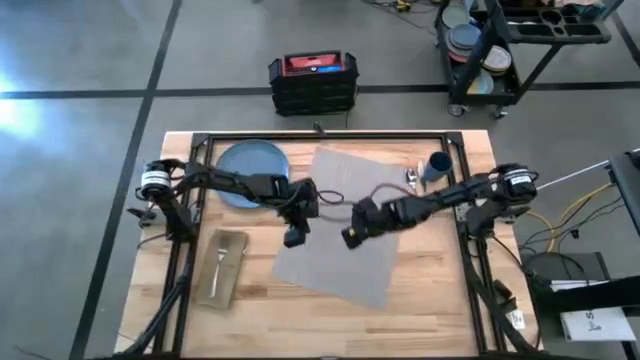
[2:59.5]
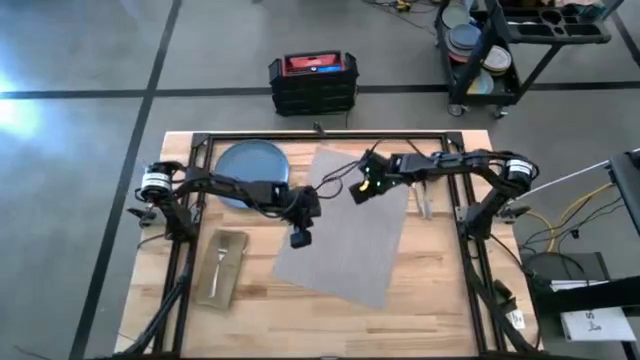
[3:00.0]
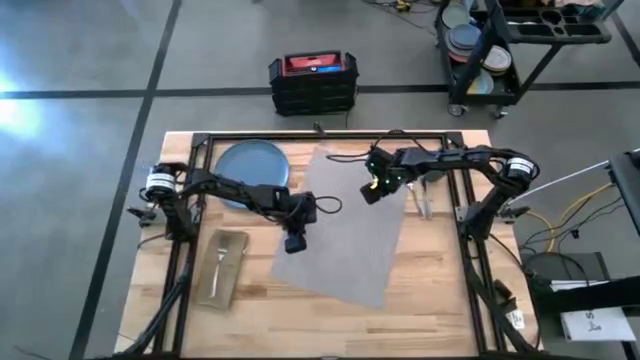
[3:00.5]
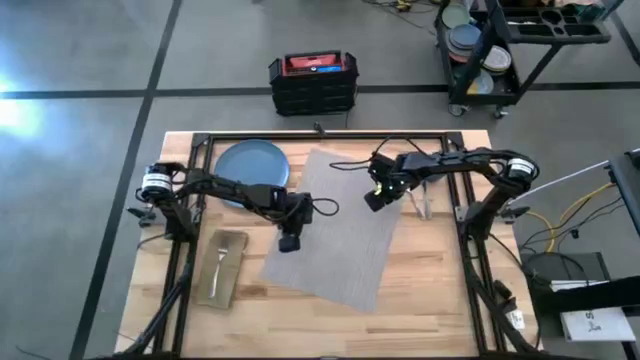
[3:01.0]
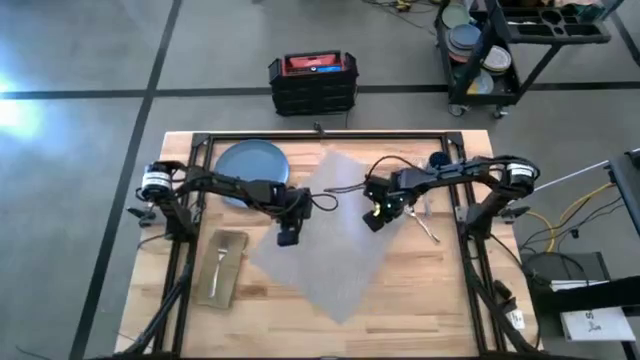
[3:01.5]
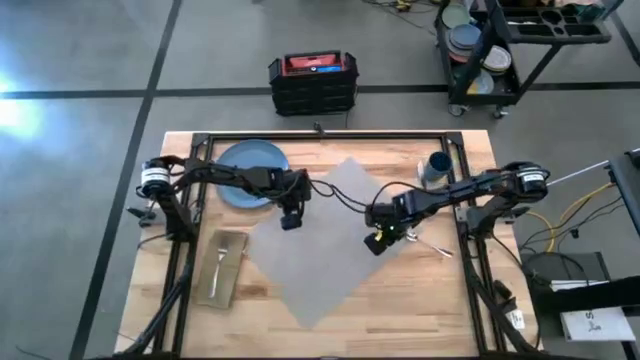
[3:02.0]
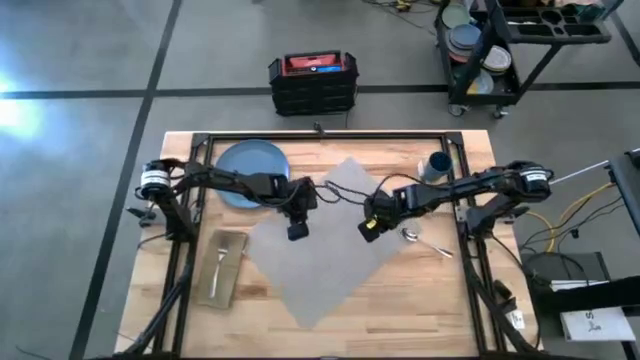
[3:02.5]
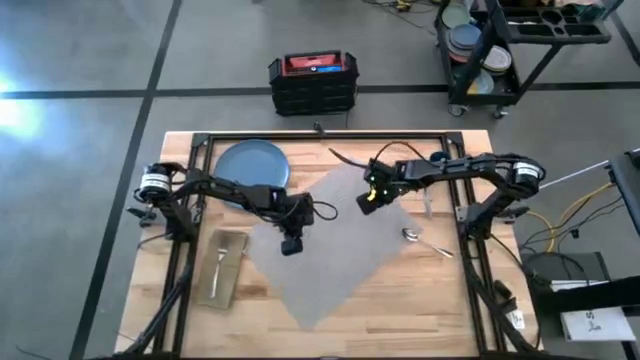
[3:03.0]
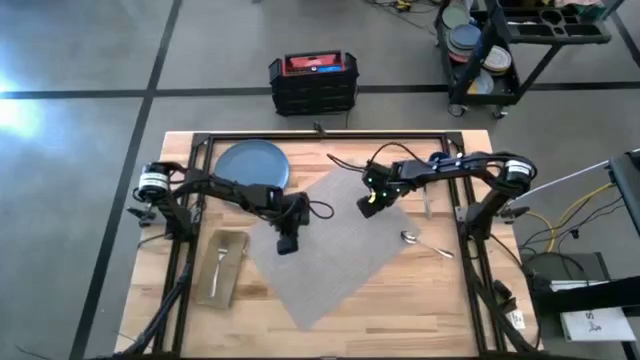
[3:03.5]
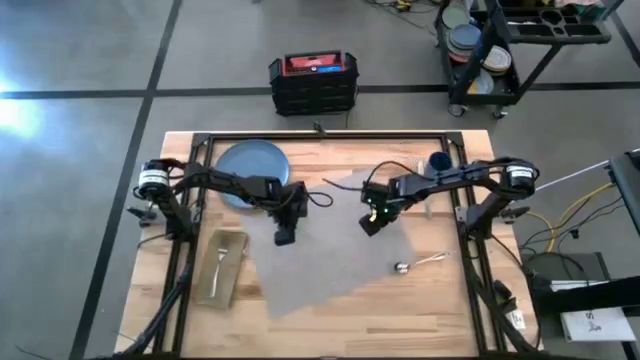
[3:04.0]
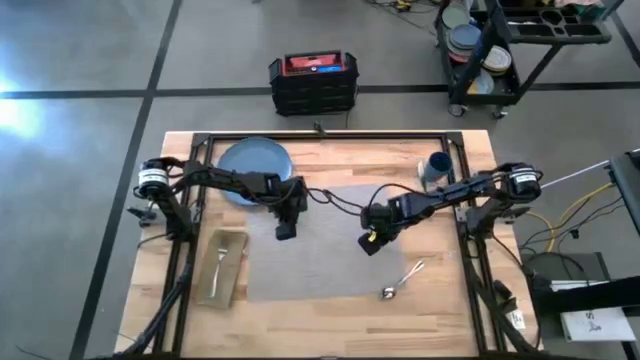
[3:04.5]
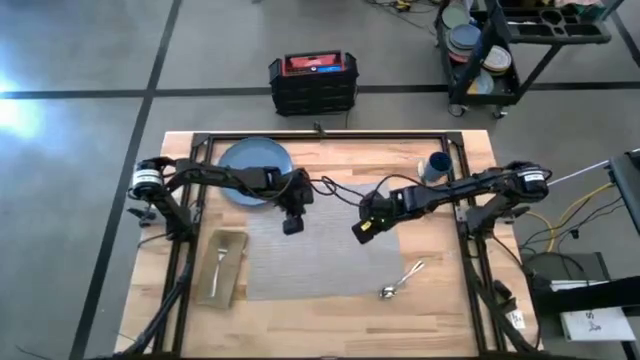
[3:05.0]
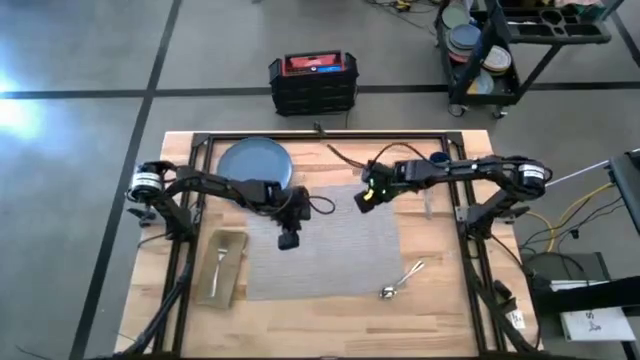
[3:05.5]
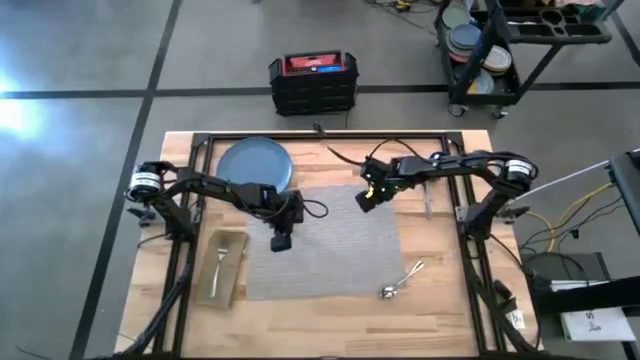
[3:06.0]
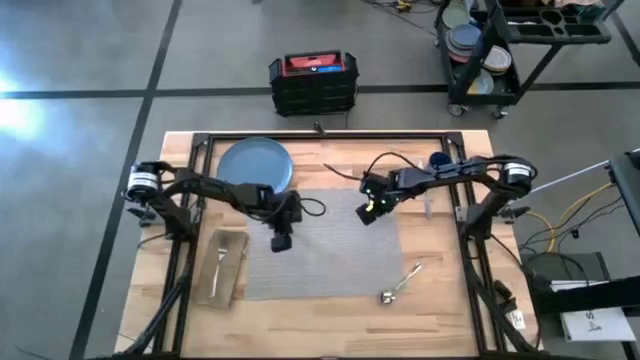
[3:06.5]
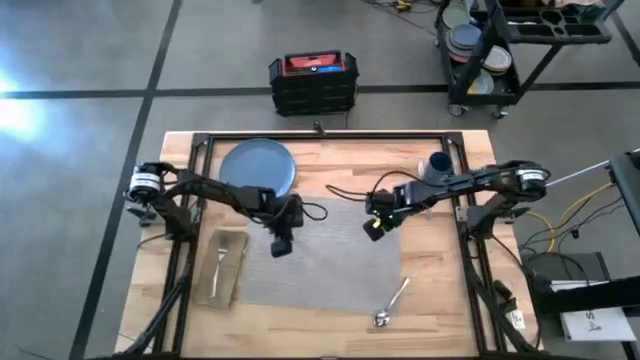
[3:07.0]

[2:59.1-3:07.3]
Task: Set table place
Adjust the gray table mat

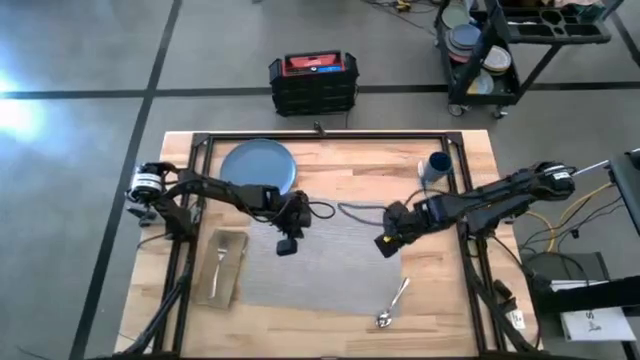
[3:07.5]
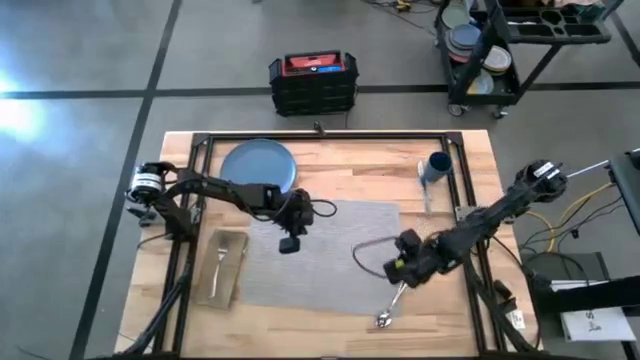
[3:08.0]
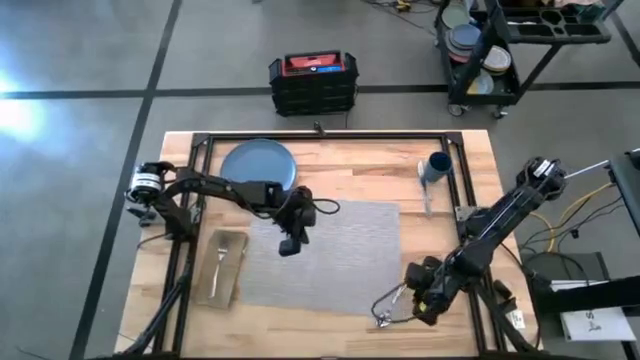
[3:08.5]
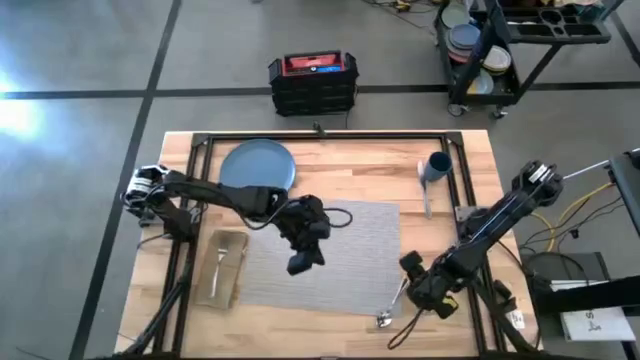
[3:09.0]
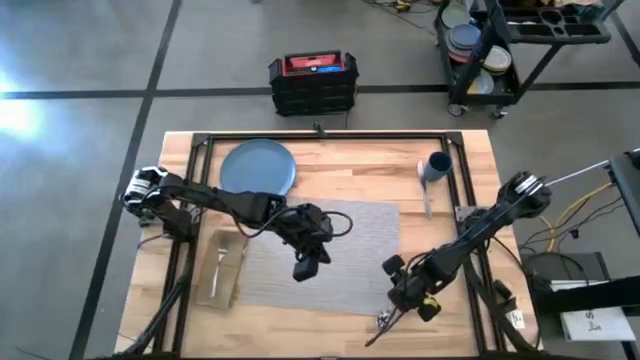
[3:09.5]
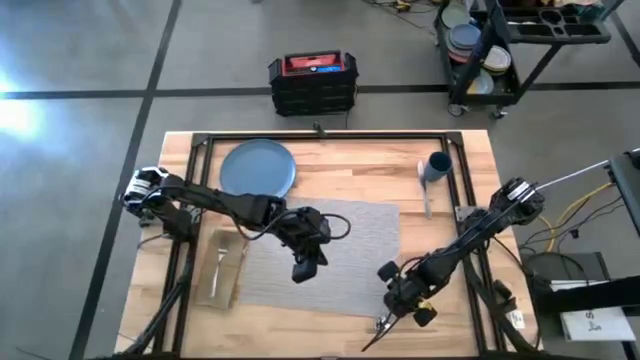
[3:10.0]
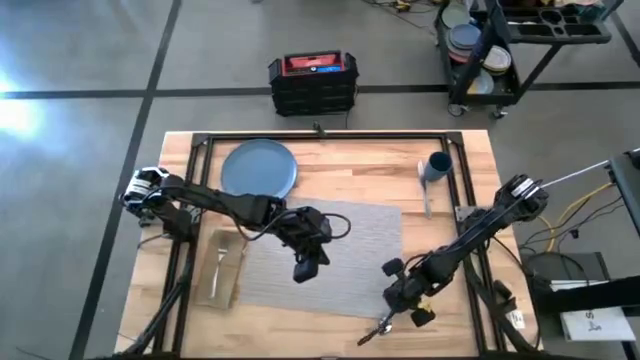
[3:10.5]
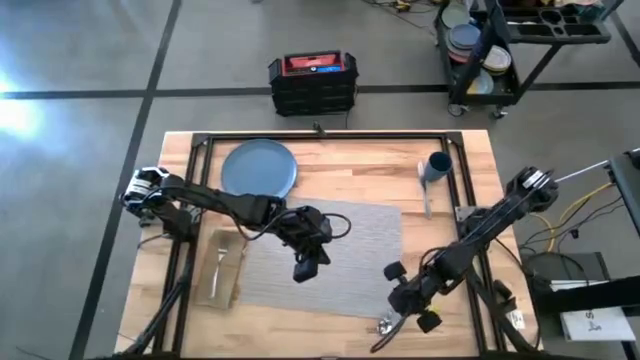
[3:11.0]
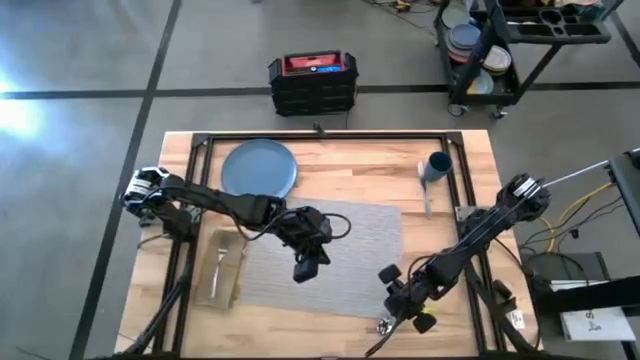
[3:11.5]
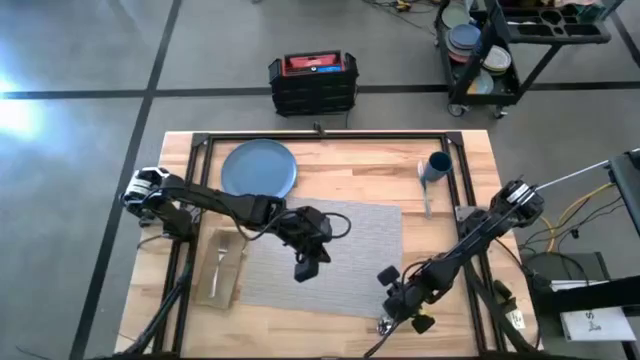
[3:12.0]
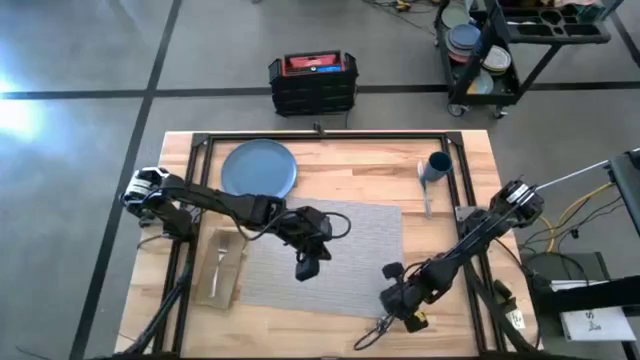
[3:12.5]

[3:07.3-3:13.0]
Put the silver spoon to the right of the gray table mat

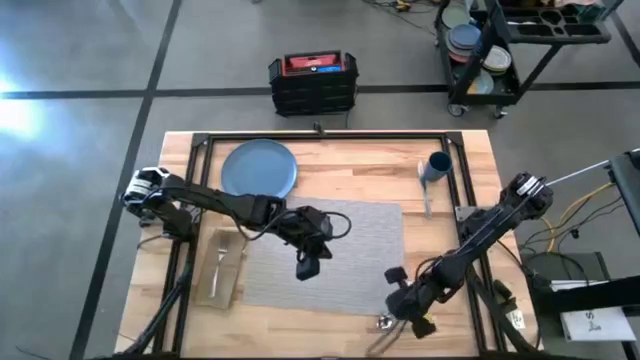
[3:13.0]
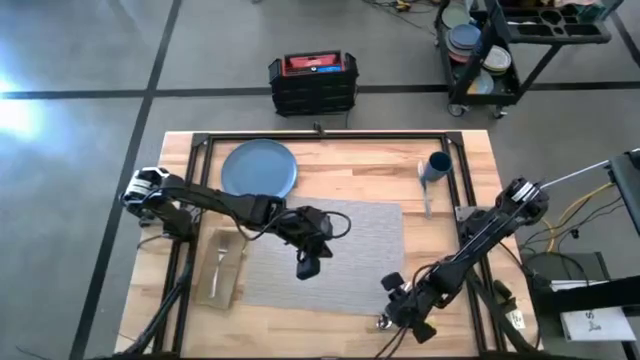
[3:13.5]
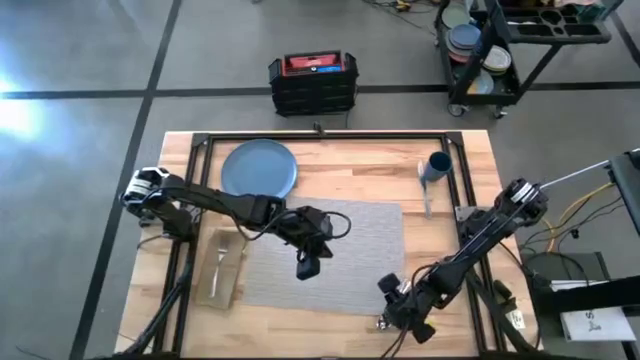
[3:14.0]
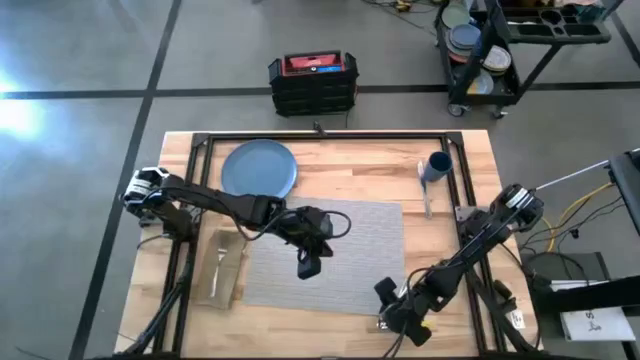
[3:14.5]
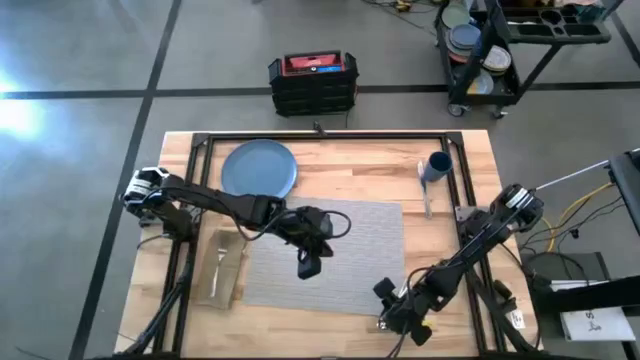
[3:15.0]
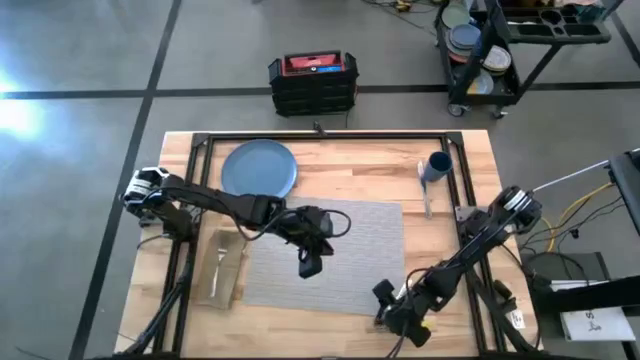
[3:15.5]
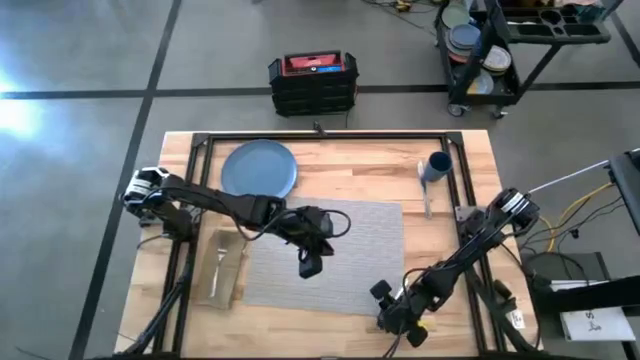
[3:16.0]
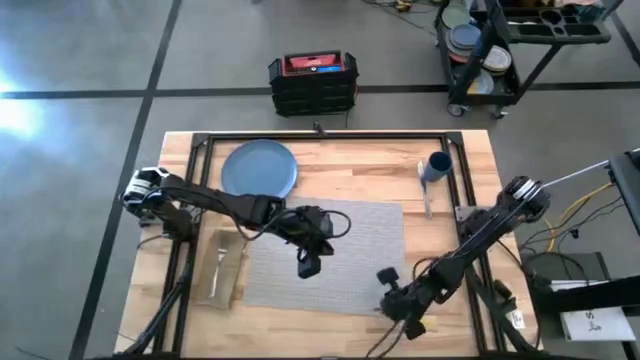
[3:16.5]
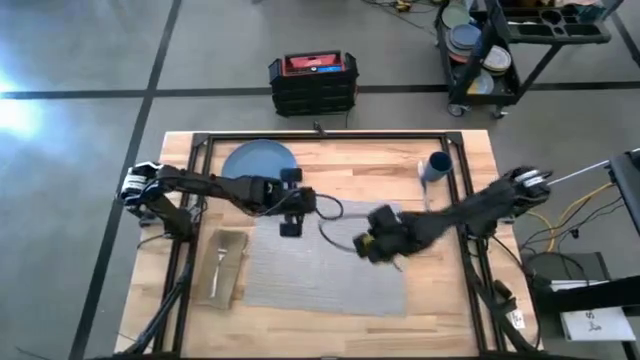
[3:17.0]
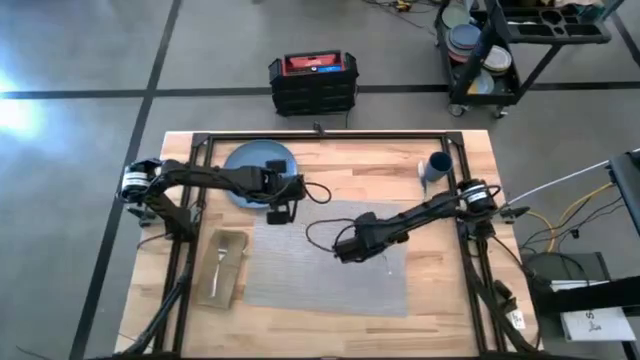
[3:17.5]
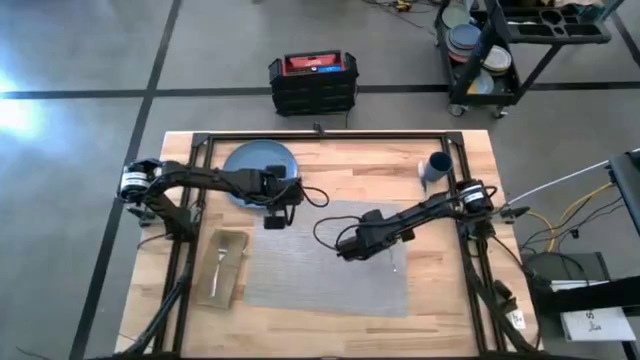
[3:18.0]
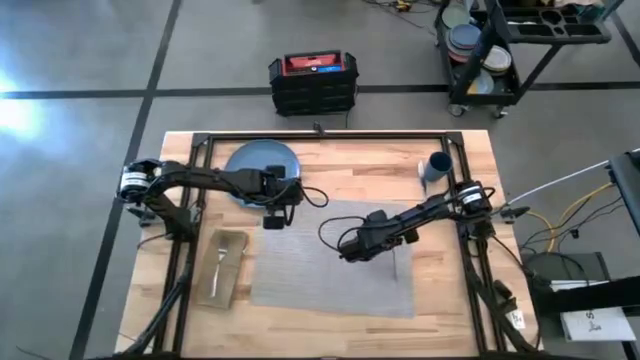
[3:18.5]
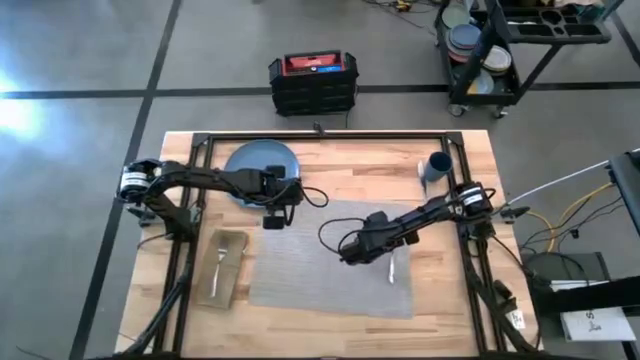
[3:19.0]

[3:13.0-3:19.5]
Put the silver spoon to the right of the gray table mat

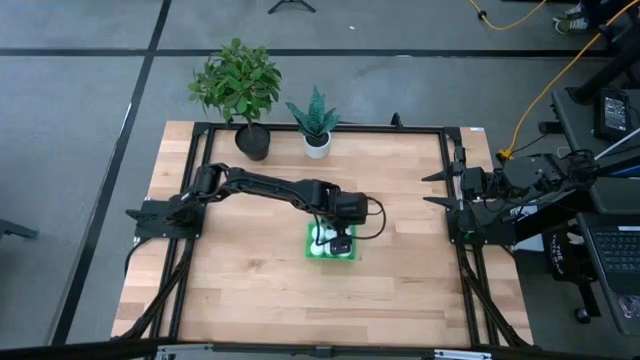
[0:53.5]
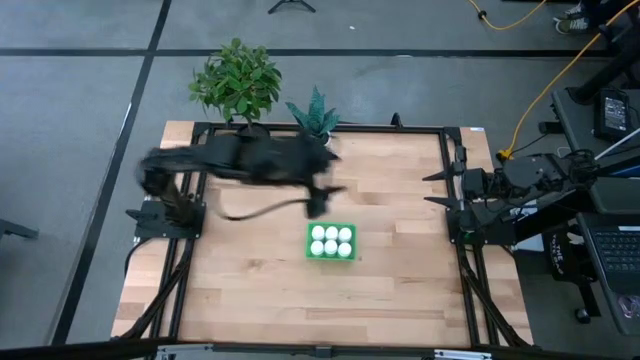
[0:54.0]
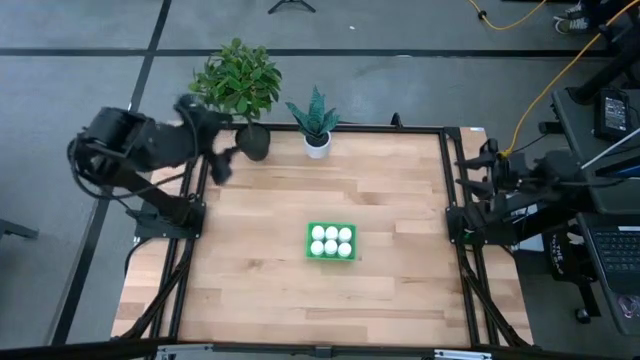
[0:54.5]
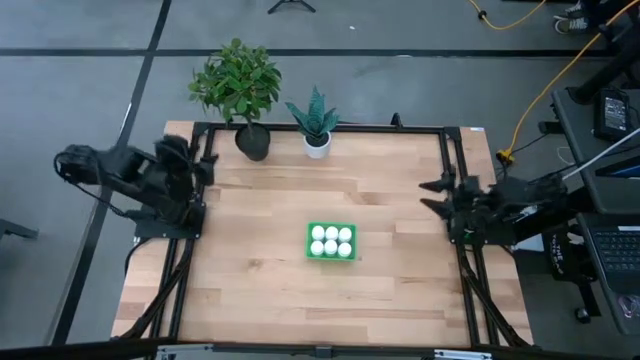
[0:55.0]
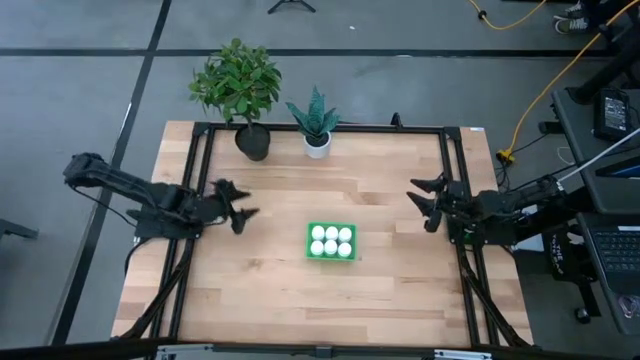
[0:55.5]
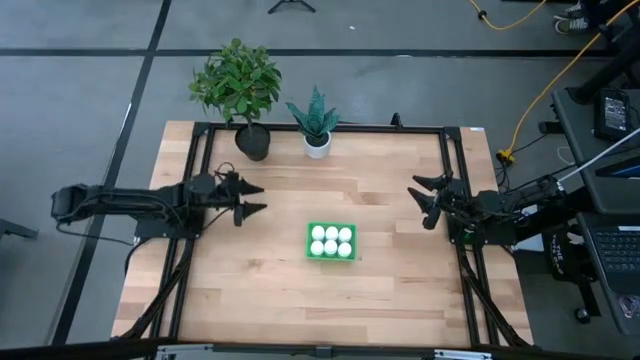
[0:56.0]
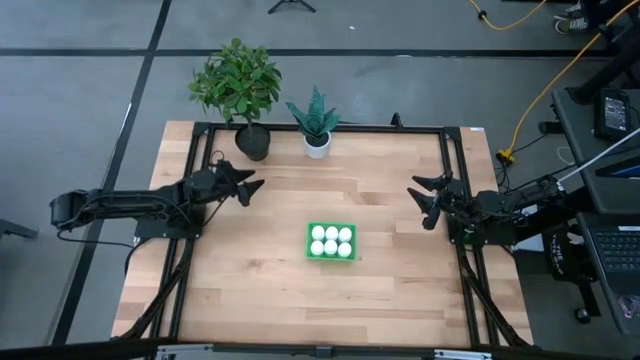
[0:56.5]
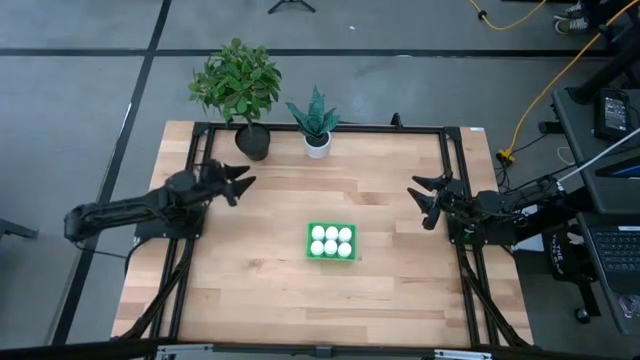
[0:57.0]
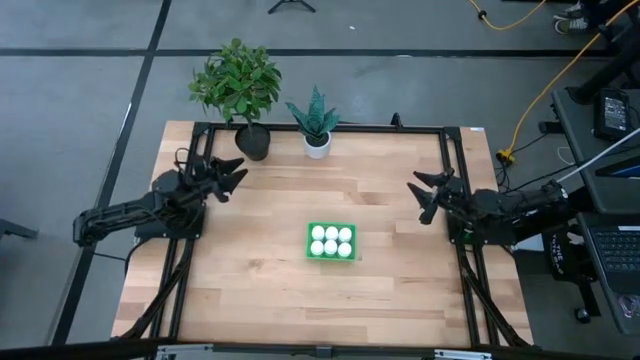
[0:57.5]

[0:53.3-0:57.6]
Task: Pick and place pill bottles into a basket
Return to Home Position
